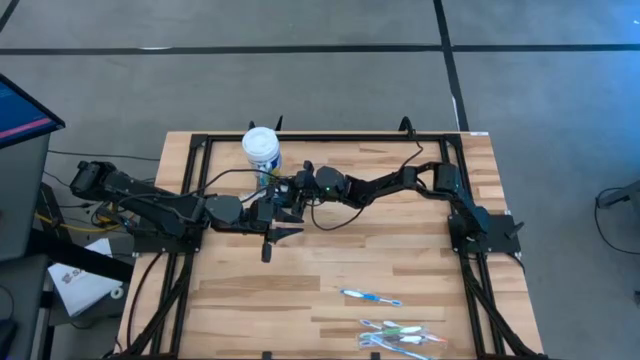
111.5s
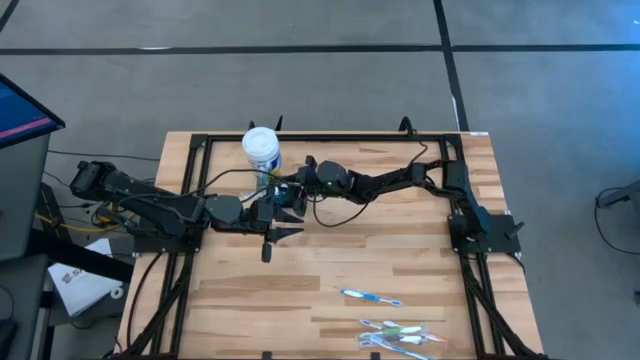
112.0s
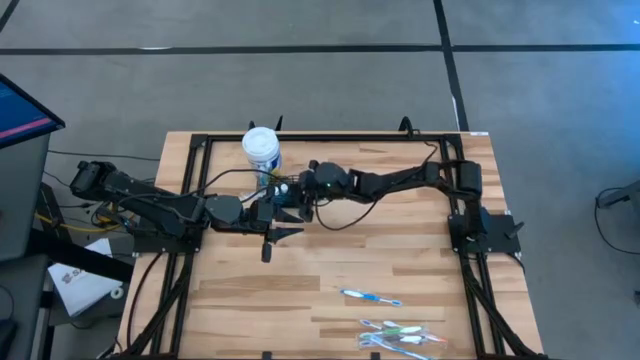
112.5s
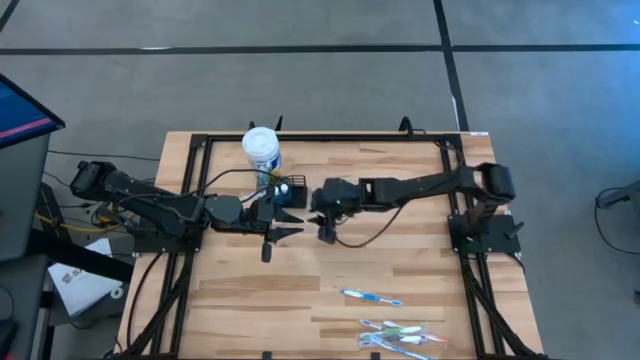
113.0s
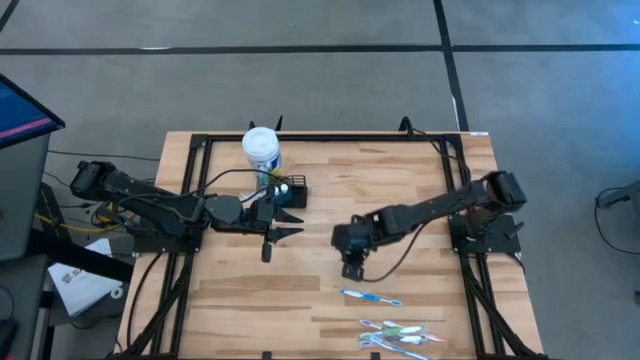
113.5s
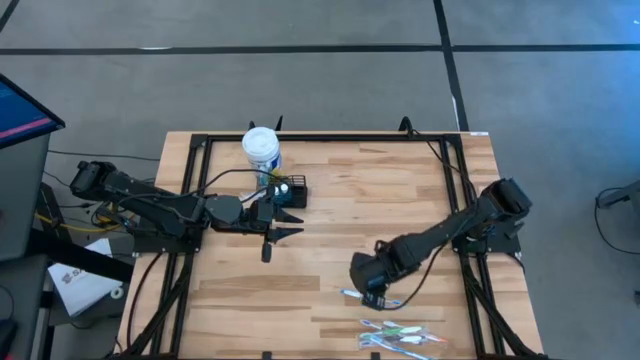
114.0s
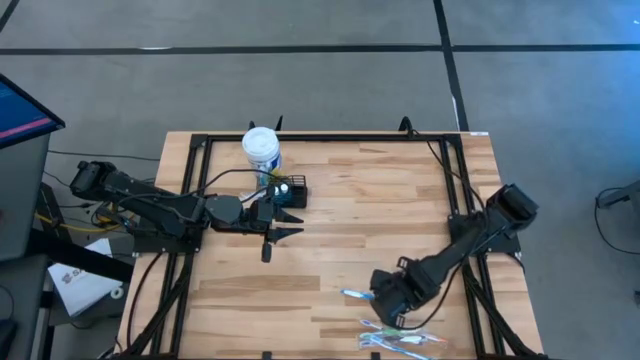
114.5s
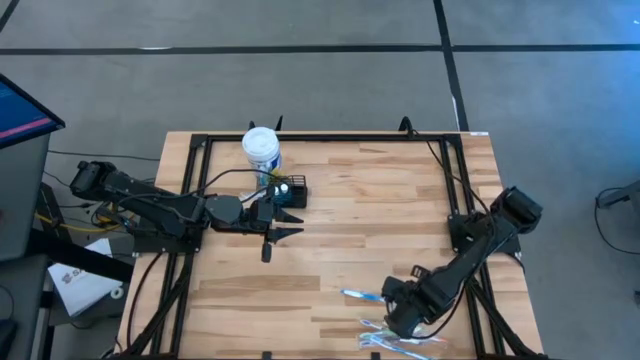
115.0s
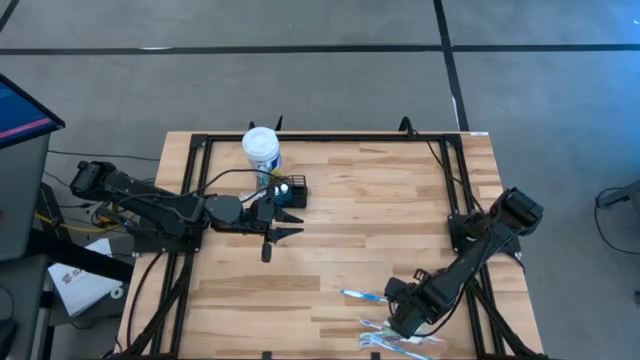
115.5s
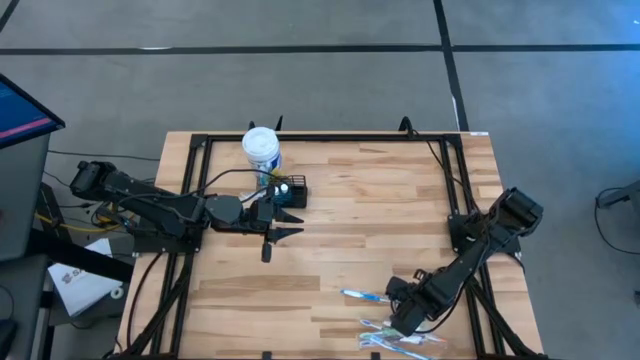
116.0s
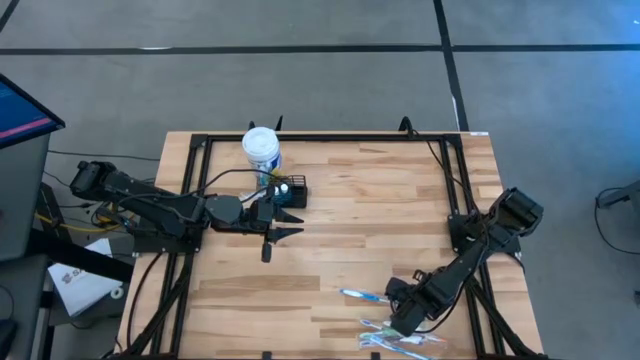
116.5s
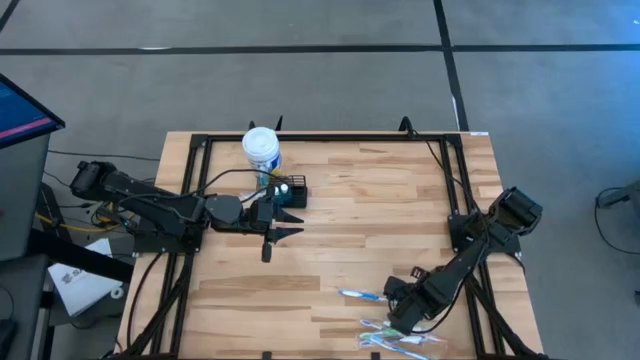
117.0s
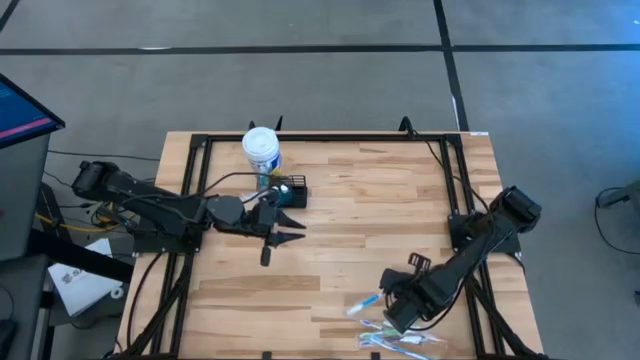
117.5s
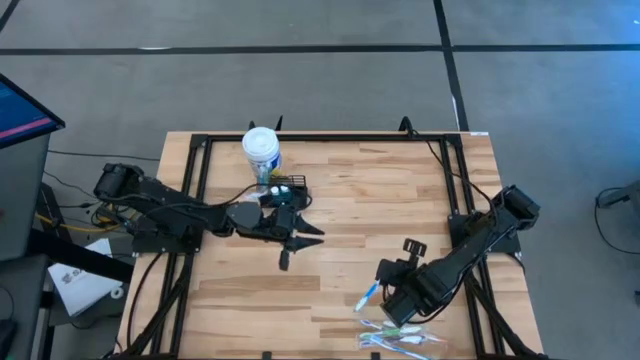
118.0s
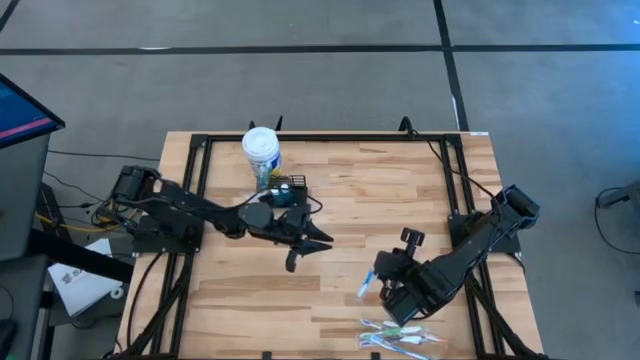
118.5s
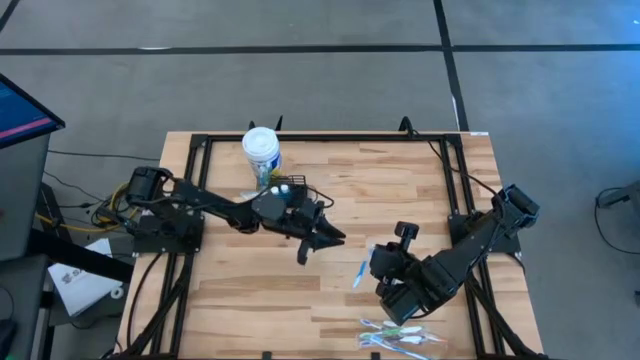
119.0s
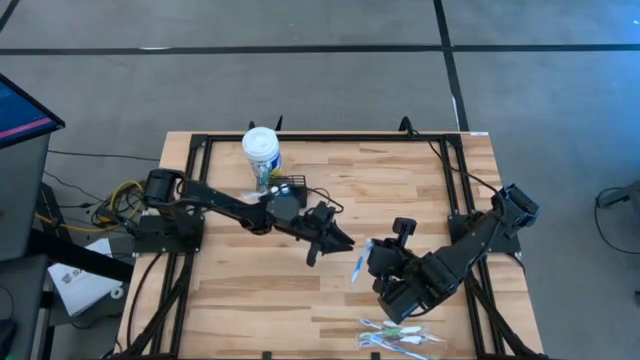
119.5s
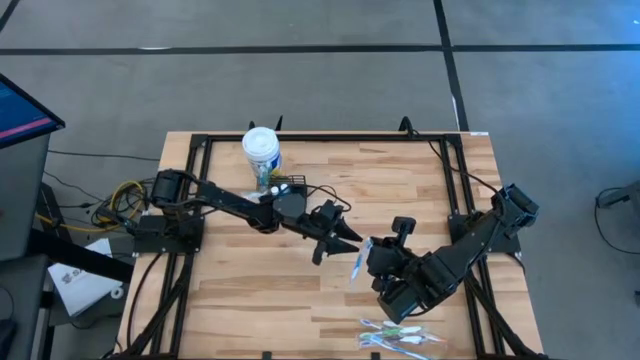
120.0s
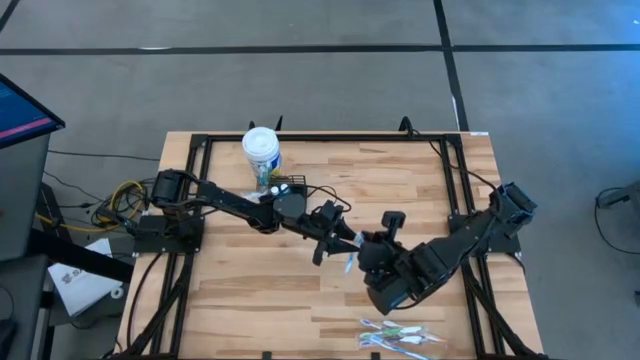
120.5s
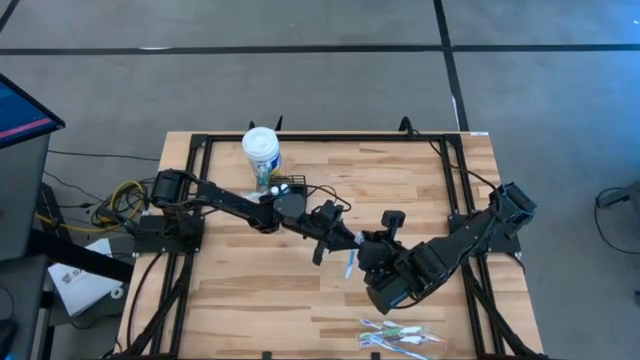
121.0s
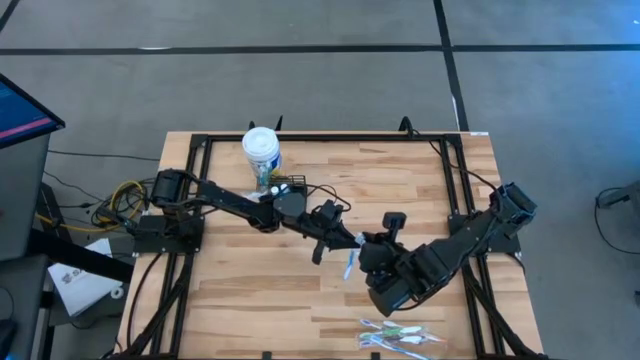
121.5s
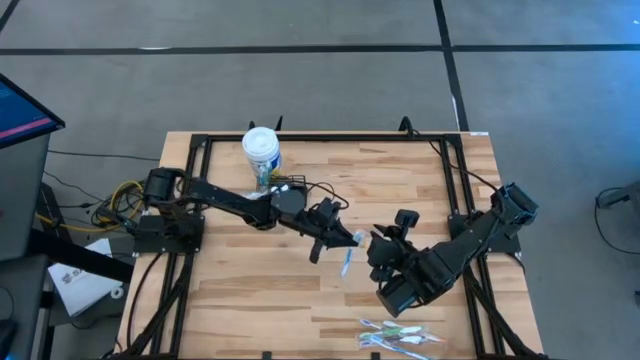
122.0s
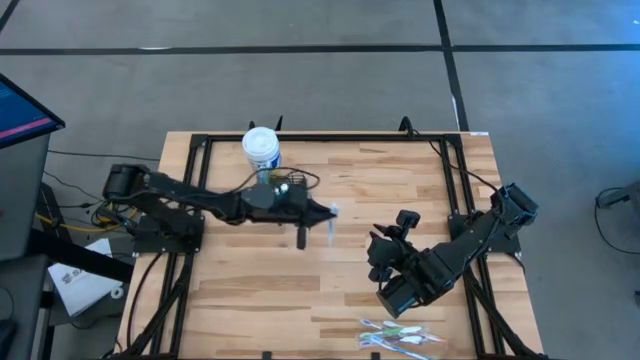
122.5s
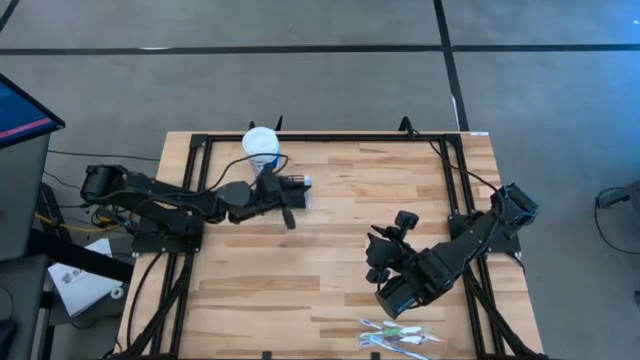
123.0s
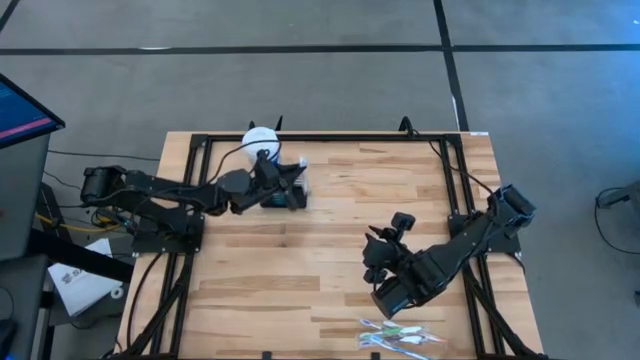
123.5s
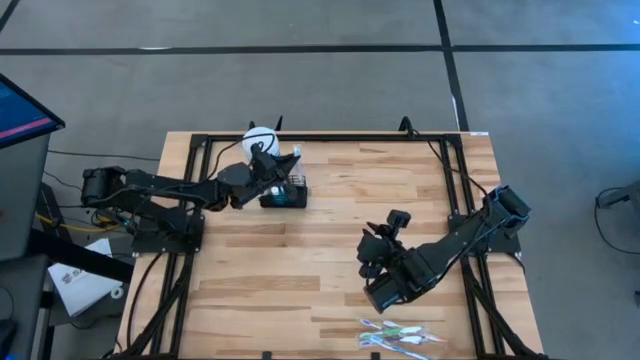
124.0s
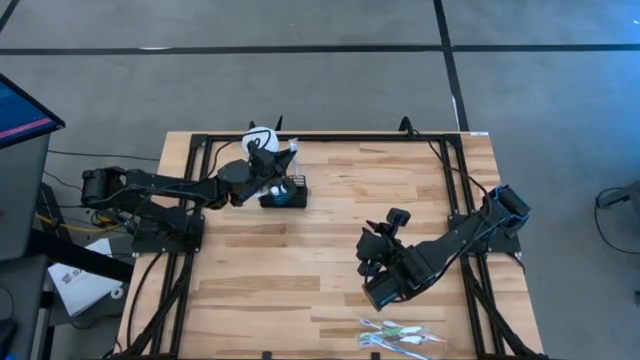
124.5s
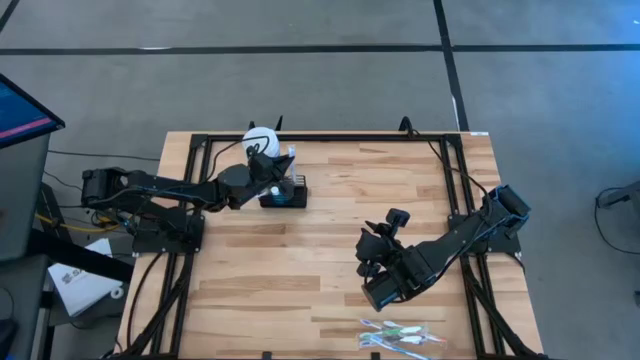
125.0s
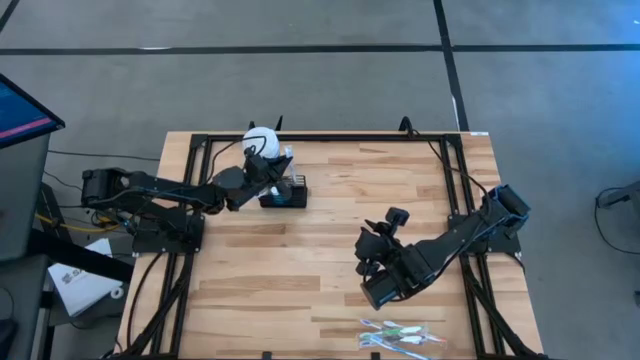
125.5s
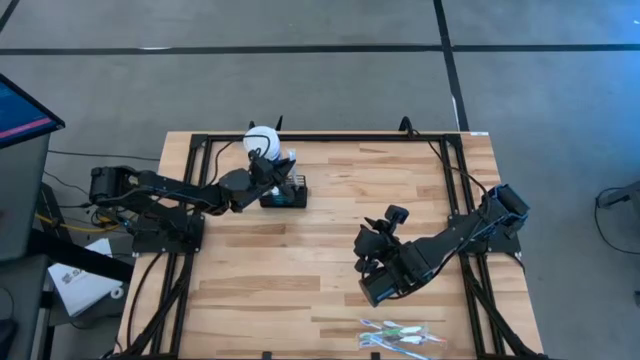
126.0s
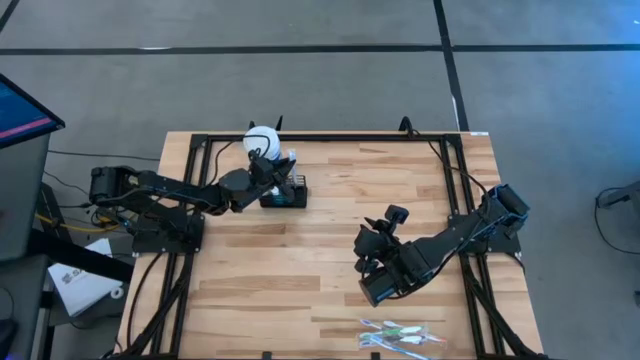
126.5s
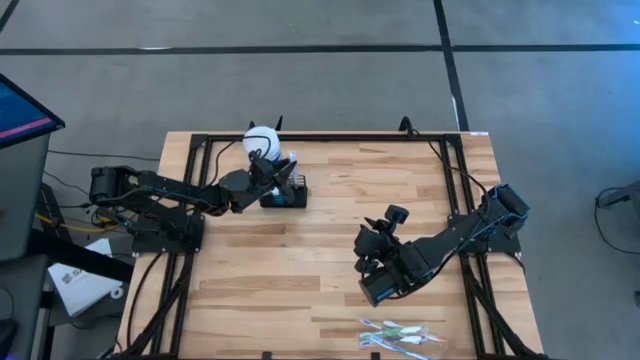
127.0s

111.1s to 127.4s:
Task: Pick & Place toothbrushing station
Put the blue toothbrush into the wire organizer

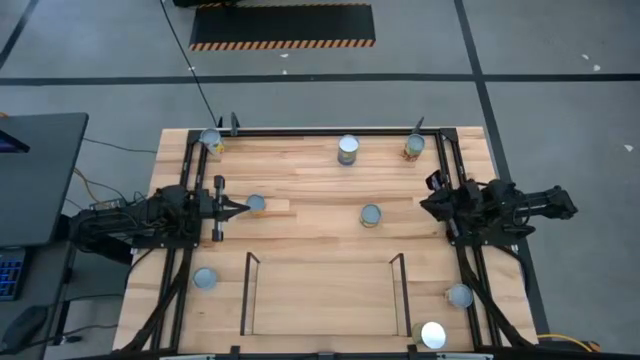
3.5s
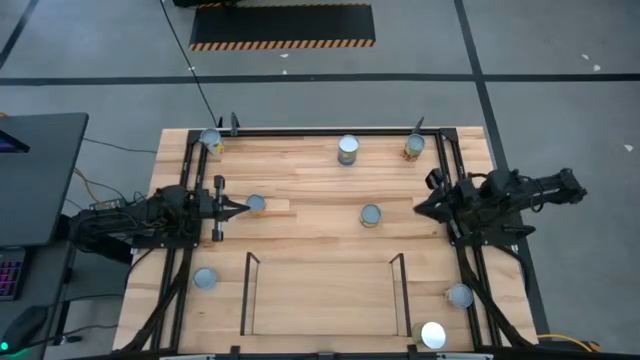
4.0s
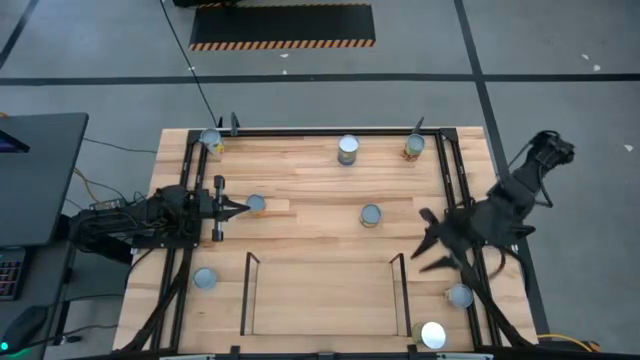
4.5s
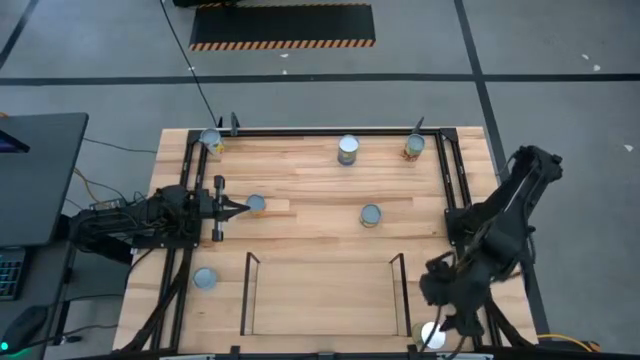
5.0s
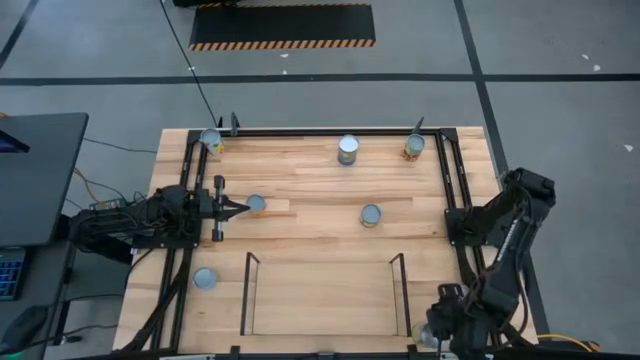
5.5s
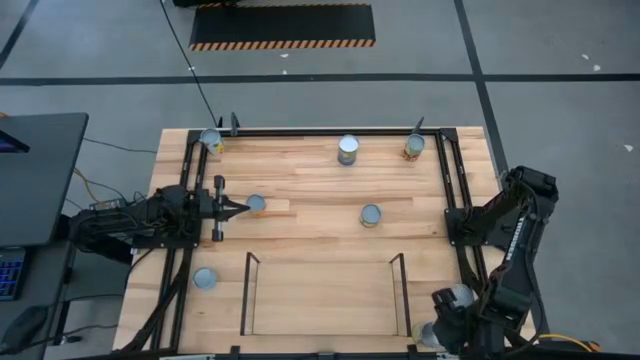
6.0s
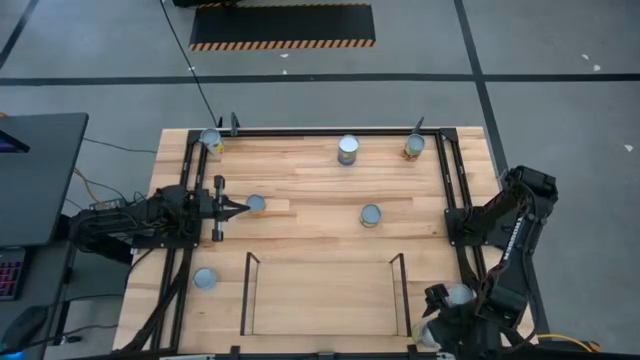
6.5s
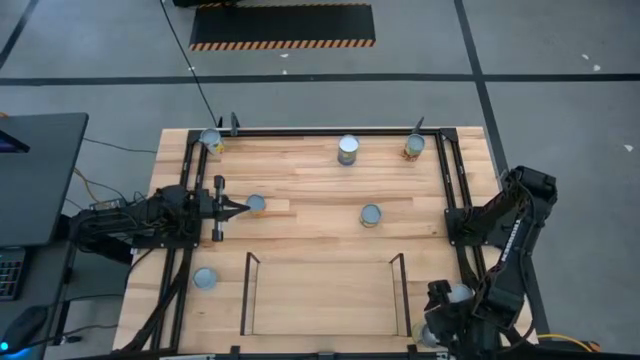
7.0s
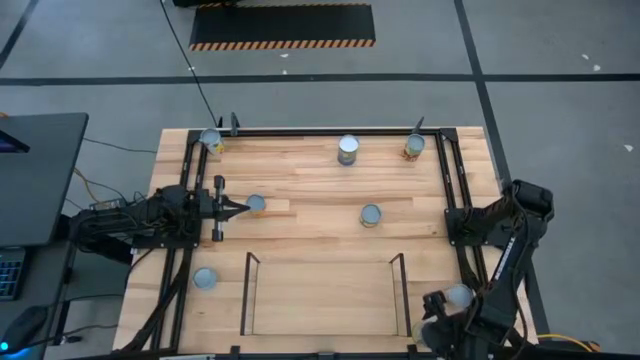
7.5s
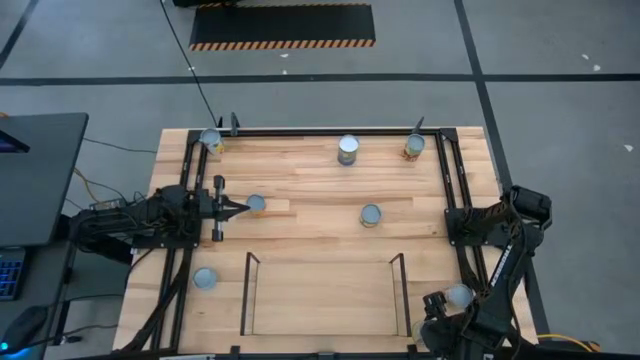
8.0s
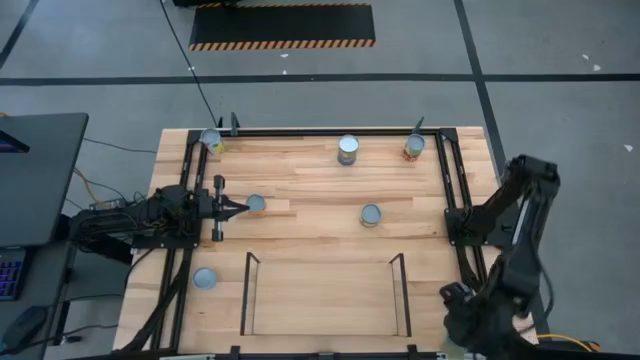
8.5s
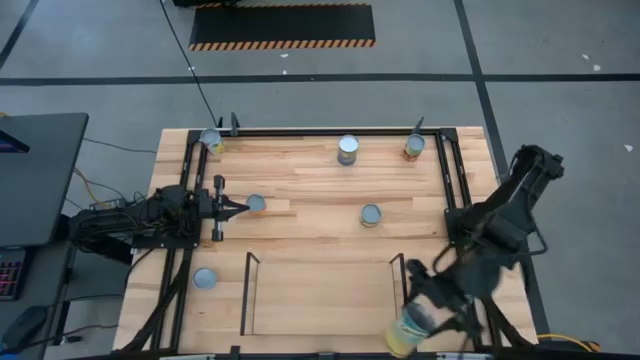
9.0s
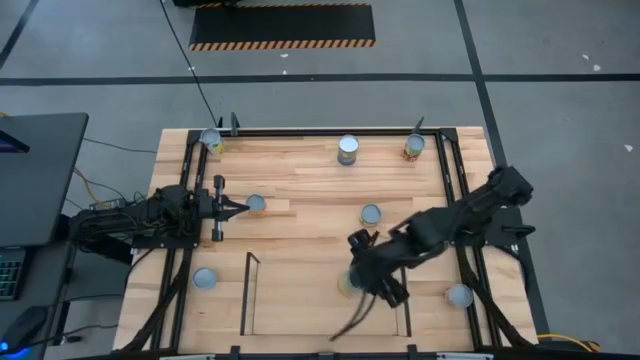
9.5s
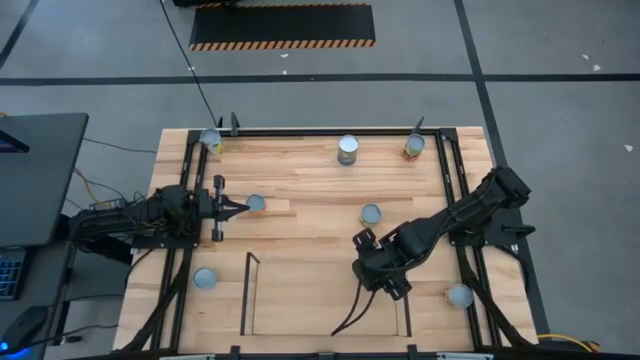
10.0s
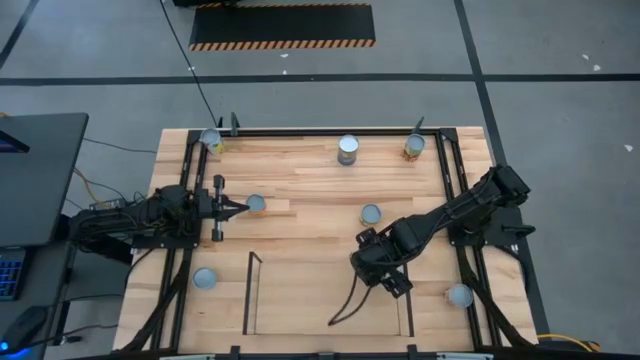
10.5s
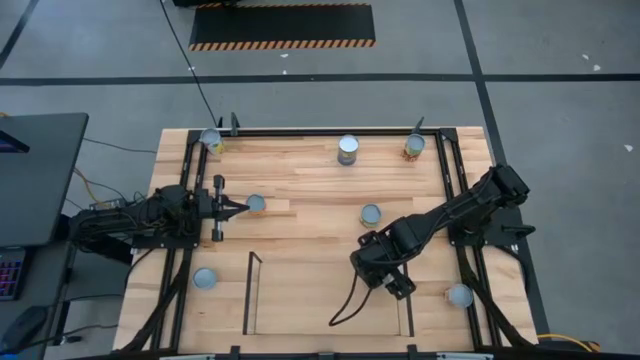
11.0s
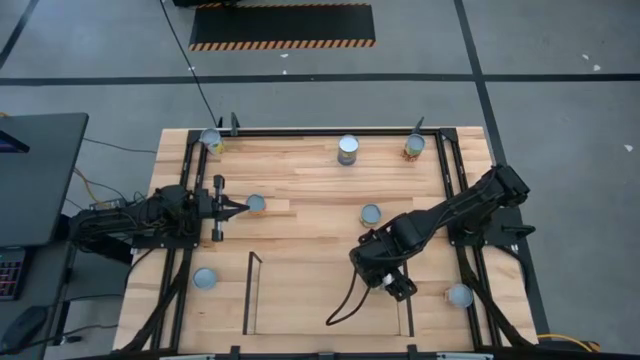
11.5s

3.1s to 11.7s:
Task: Pick and place cans onto a shelf
Put the canned carrots on the shelf
